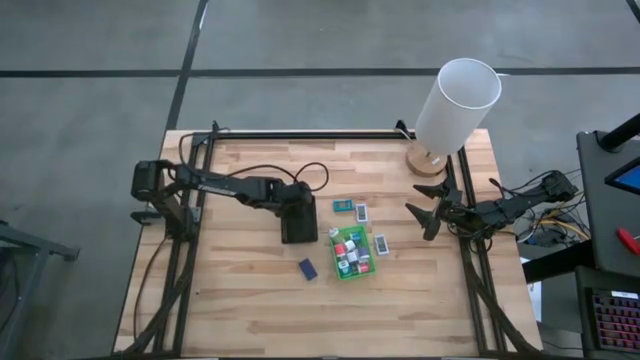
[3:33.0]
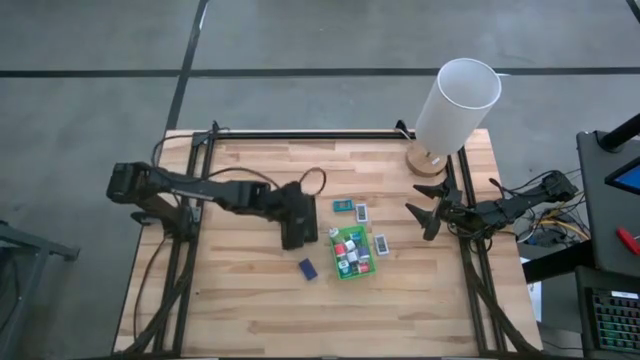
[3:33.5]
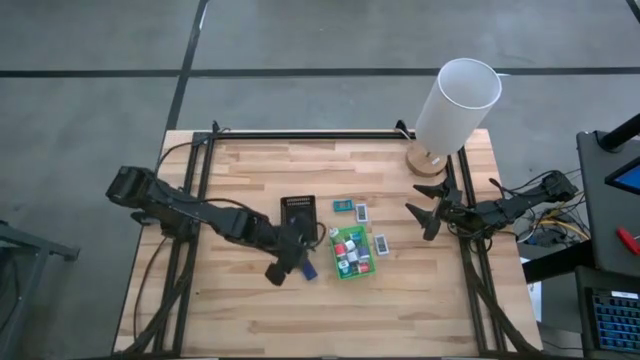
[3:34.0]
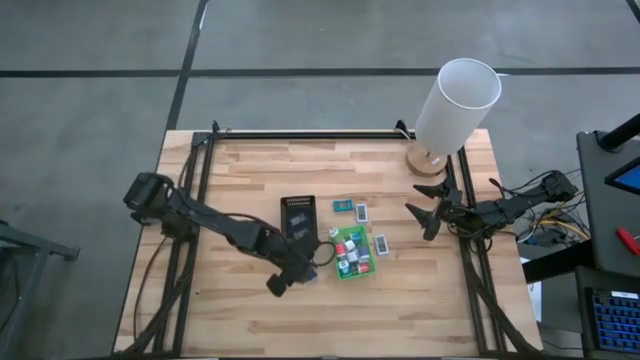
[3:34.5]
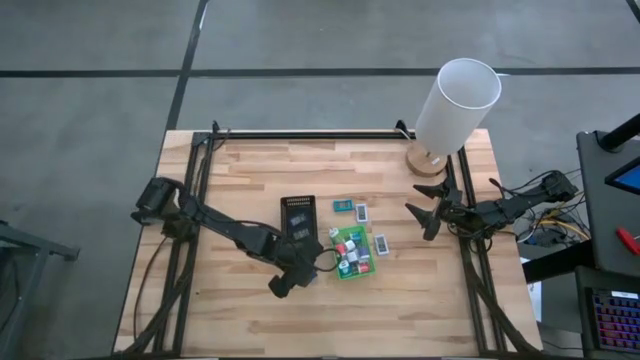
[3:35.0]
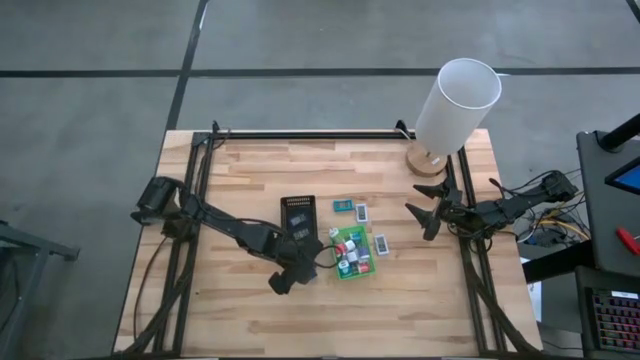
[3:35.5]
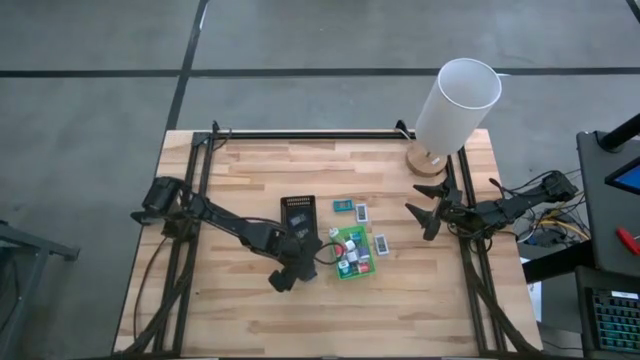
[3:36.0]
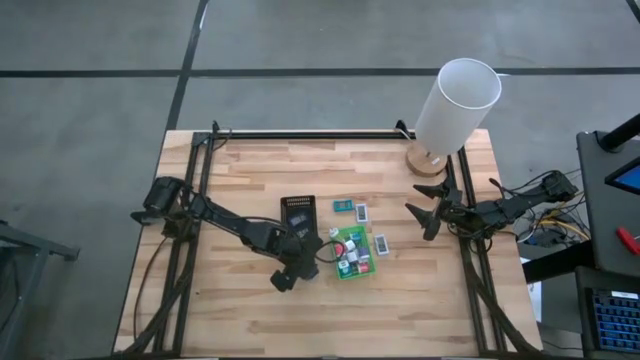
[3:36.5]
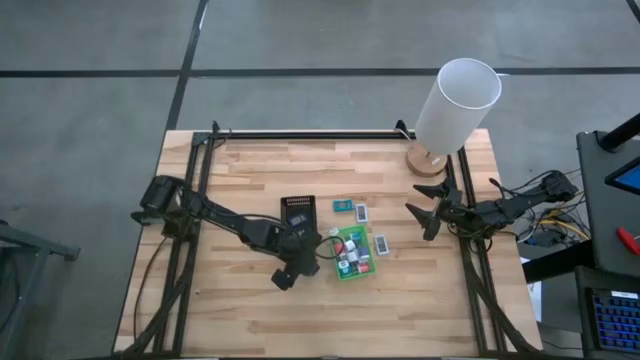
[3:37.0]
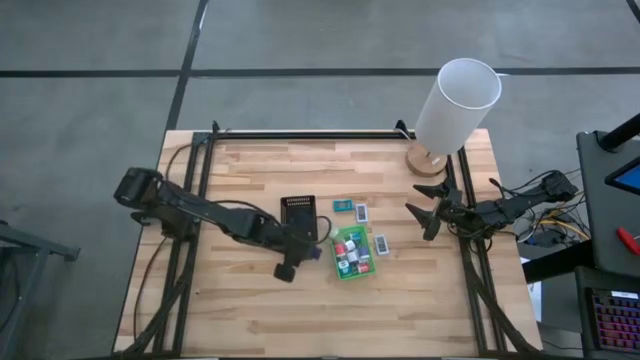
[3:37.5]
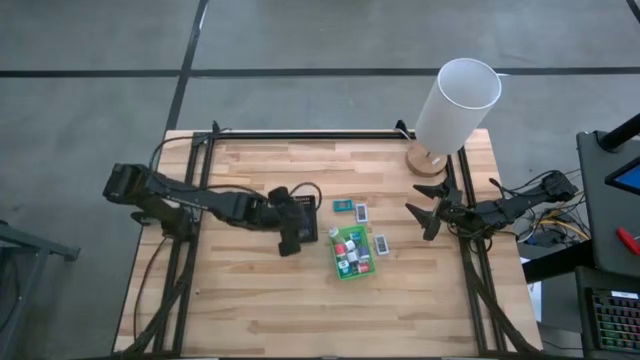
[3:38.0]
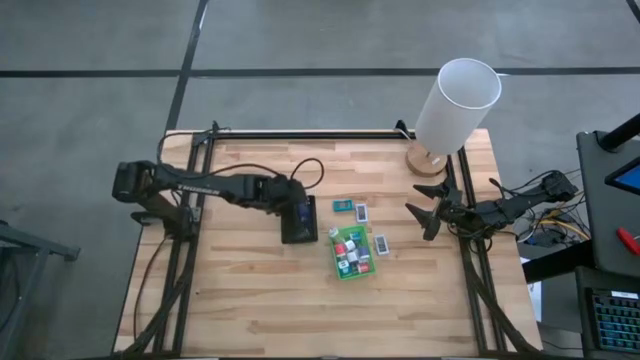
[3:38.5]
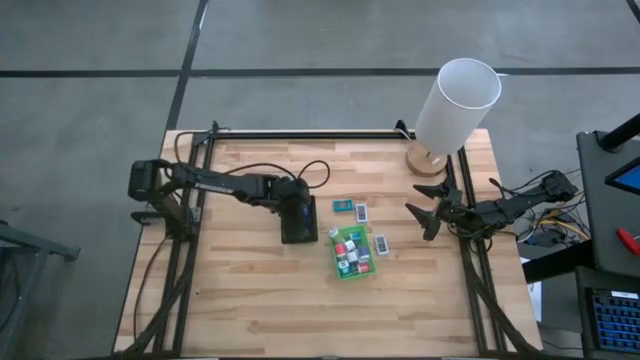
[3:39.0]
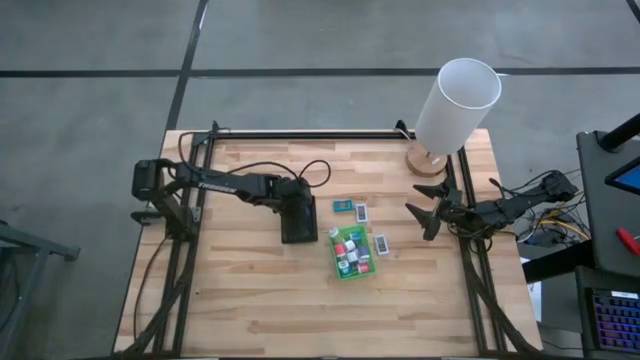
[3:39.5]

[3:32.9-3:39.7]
Task: Pick & Place Office items
Put the blue digital clock into the black bin

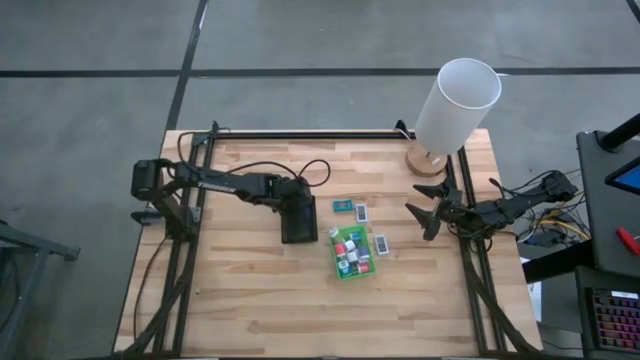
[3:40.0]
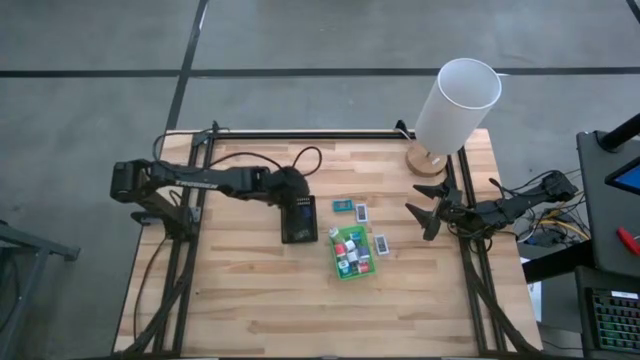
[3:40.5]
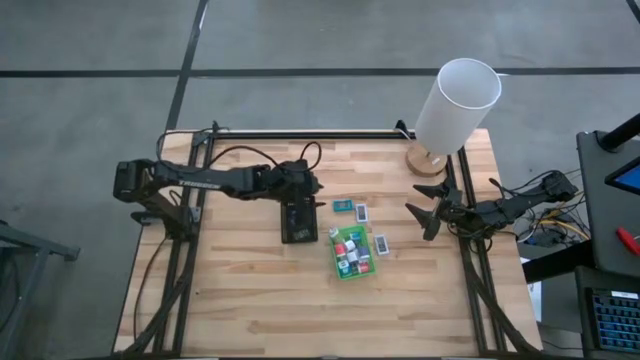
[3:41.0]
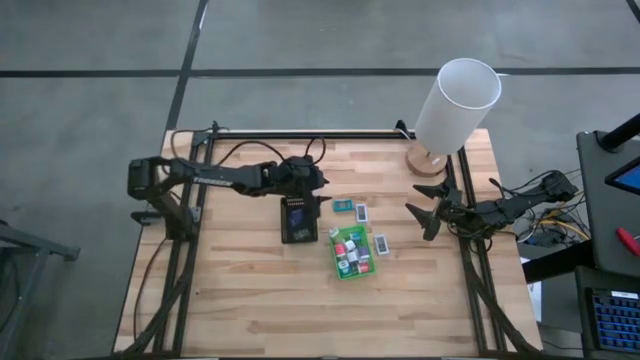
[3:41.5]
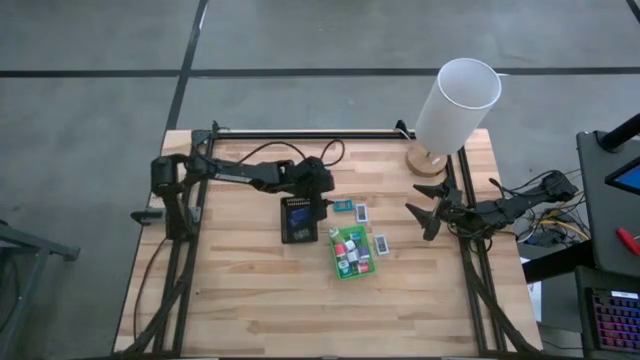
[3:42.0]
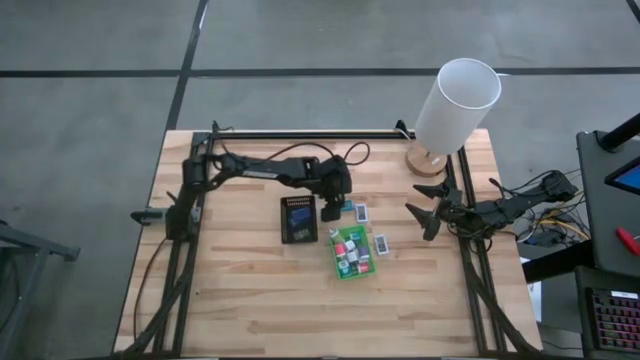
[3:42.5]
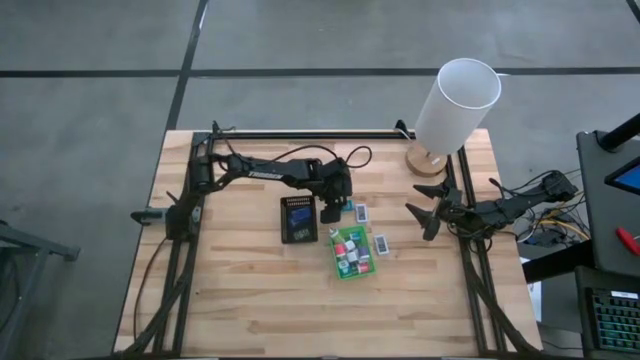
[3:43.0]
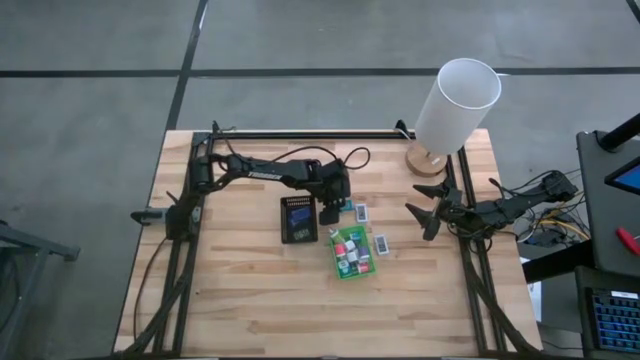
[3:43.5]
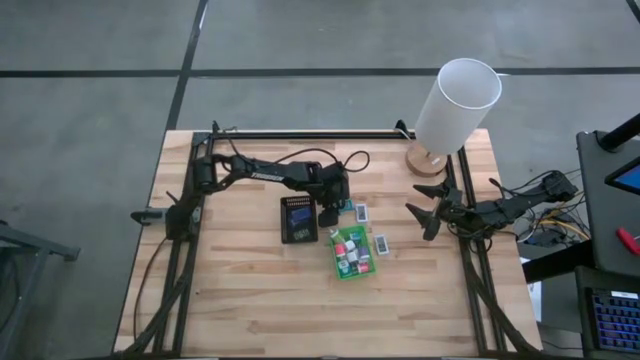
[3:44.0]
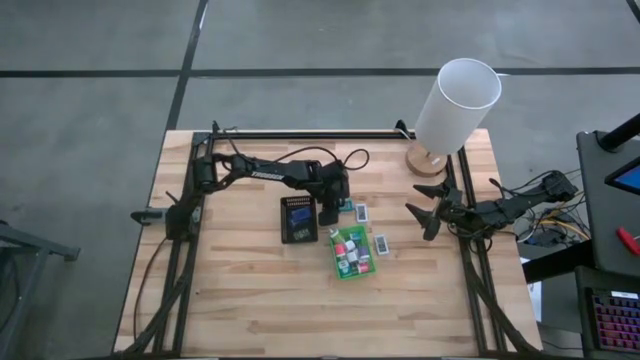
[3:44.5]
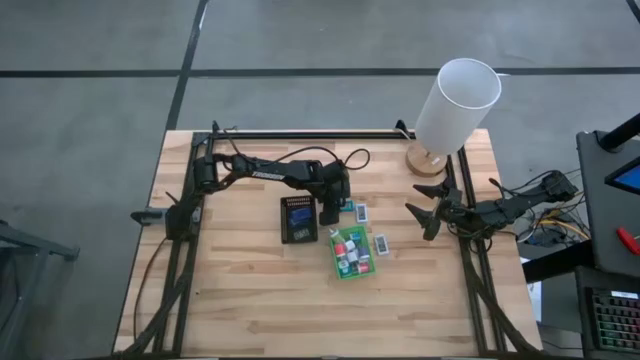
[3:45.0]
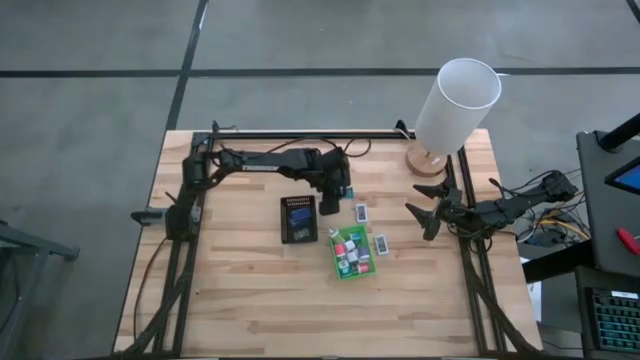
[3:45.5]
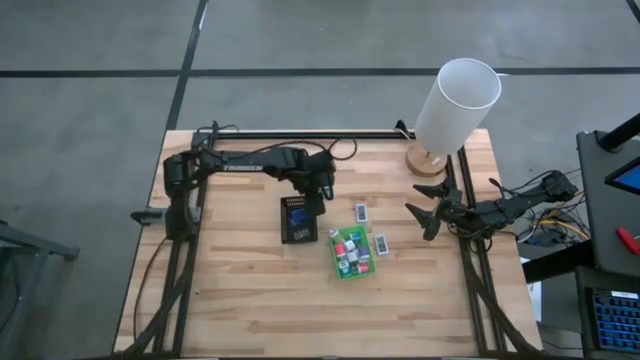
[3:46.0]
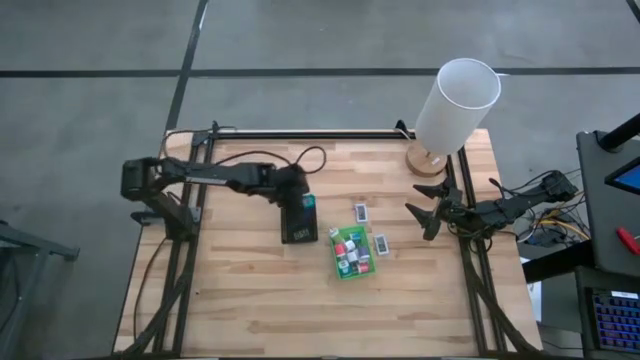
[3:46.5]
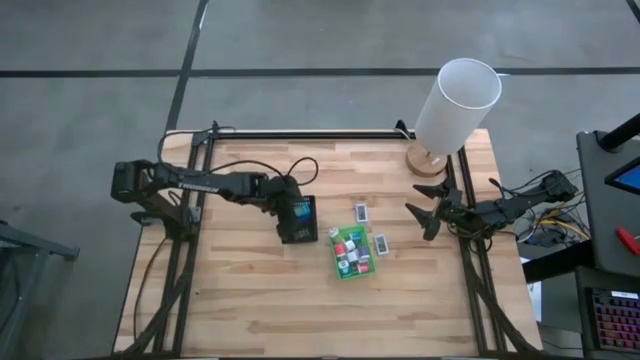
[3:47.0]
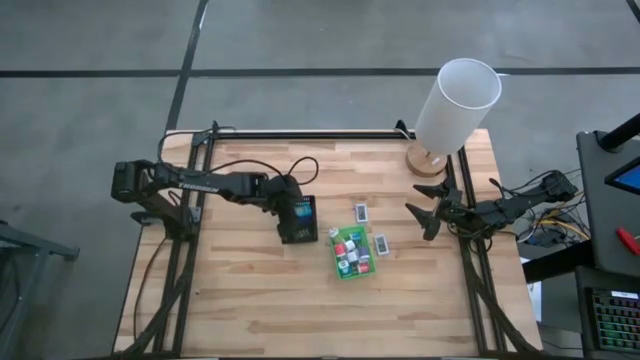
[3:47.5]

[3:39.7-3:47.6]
Put the light blue digital clock into the black bin

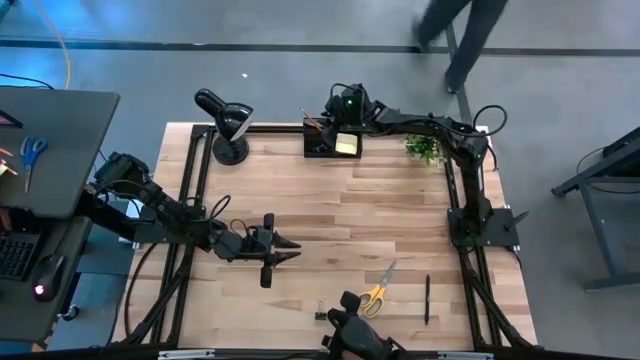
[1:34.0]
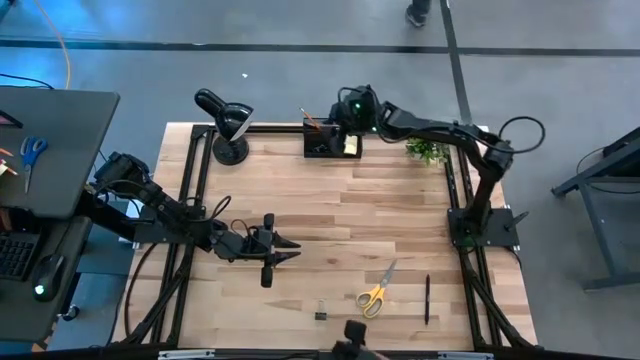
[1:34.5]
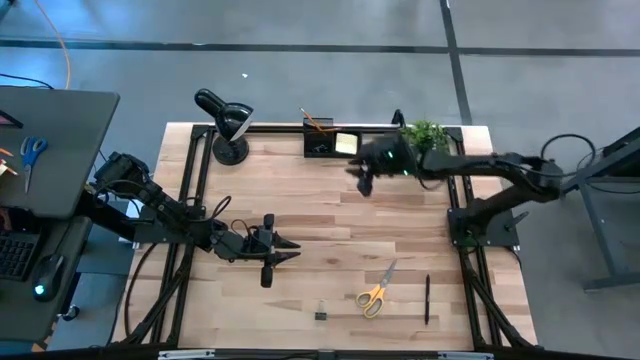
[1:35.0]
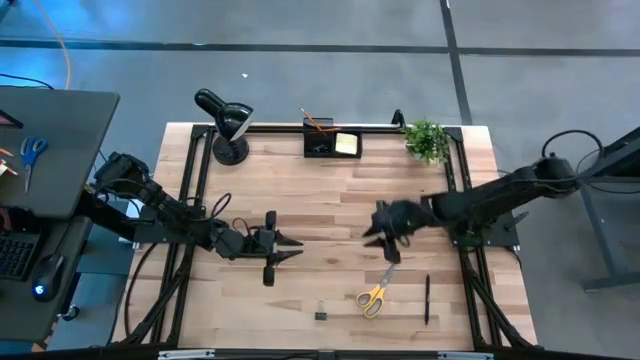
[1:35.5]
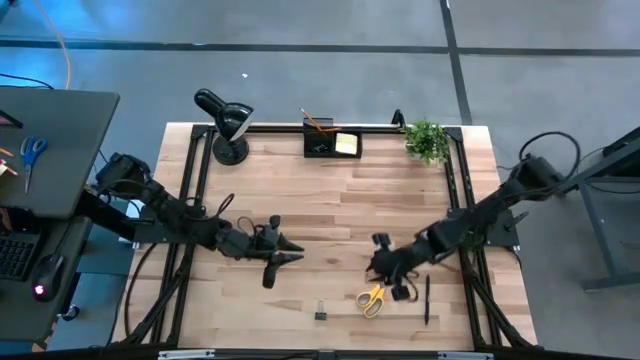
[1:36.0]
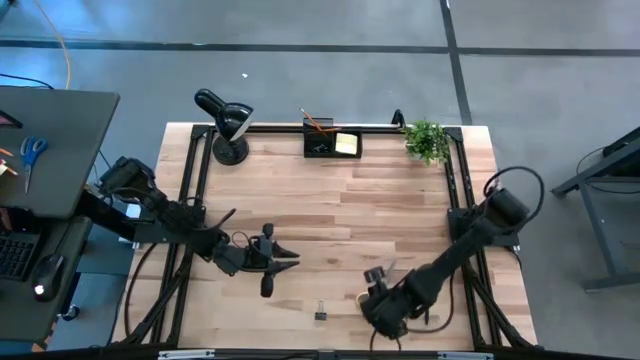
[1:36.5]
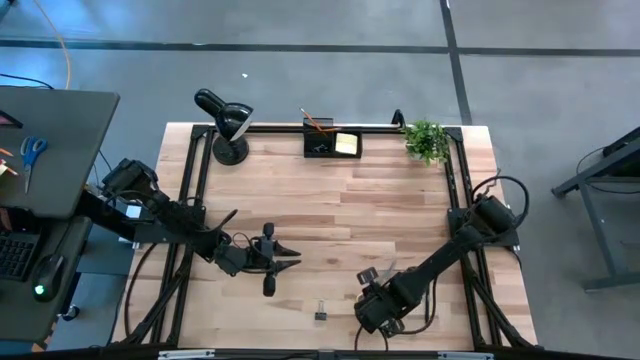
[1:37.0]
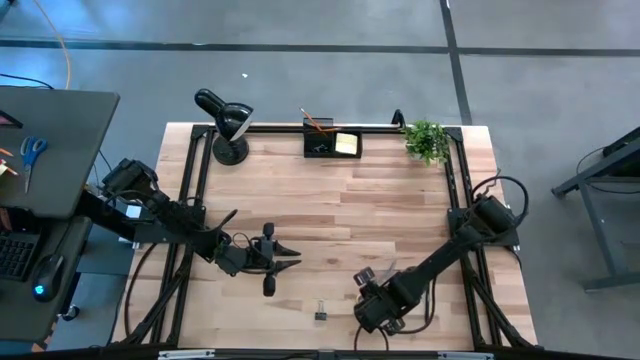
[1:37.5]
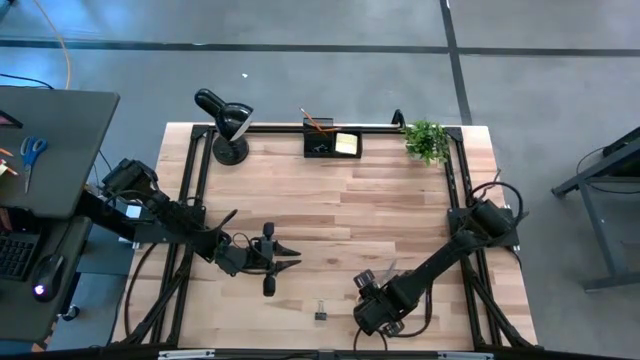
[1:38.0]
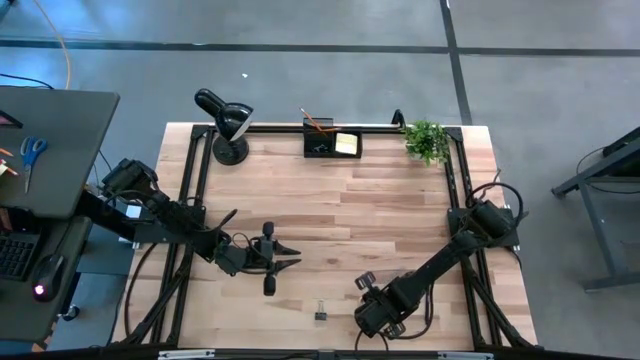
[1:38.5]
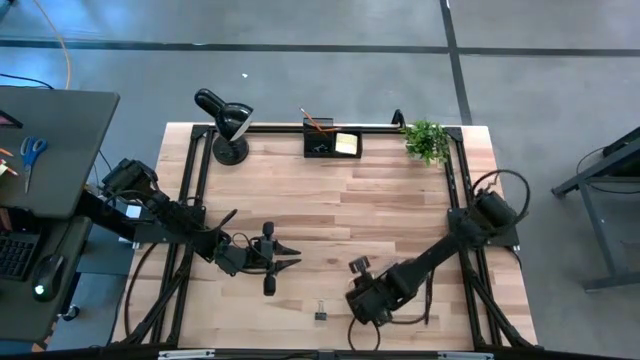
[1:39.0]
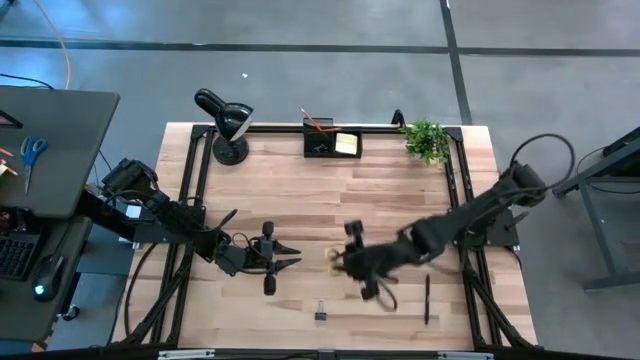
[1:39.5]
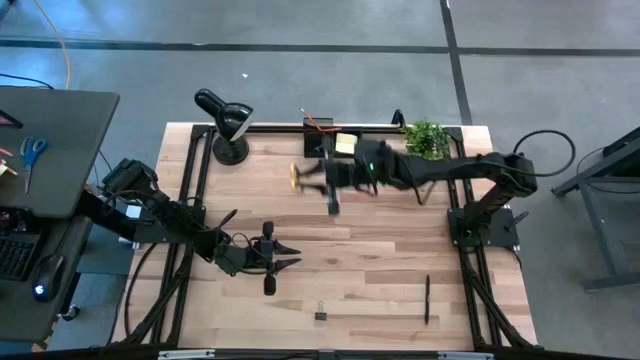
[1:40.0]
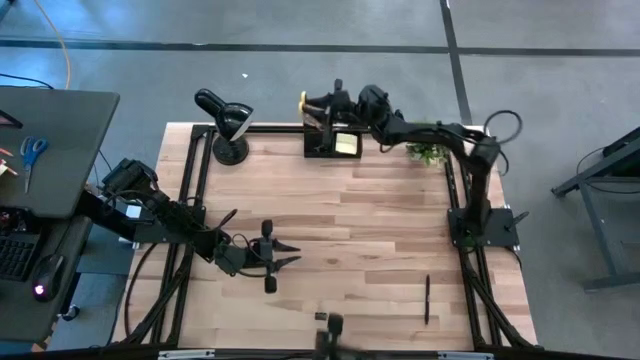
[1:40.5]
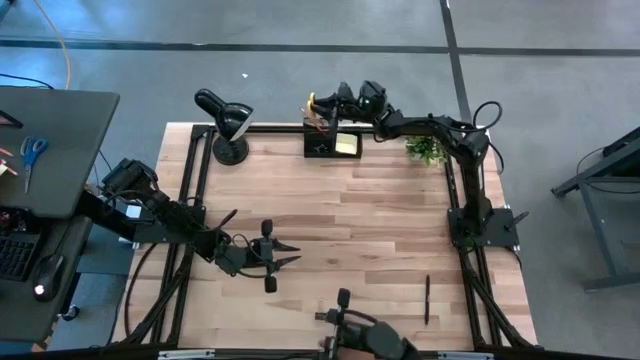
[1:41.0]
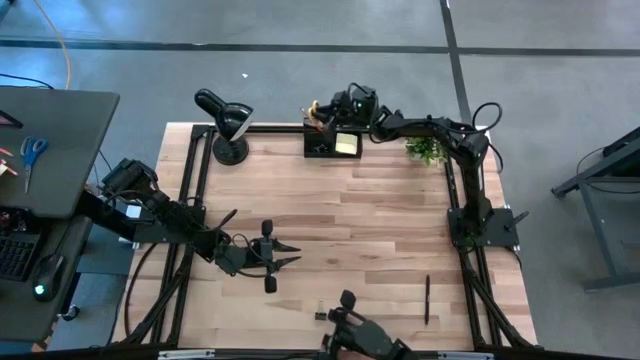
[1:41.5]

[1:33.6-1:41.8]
Task: Pick and place office supplies into organizer
Put the yellow scissors into the black desk organizer
